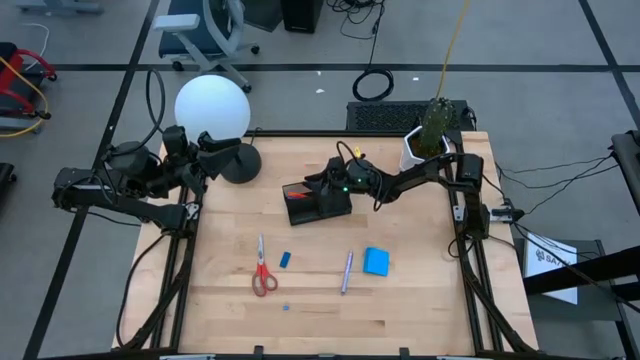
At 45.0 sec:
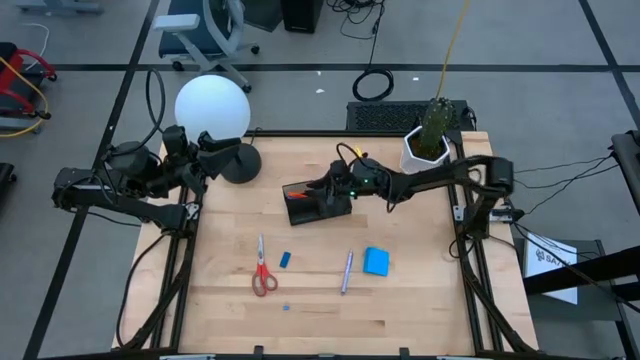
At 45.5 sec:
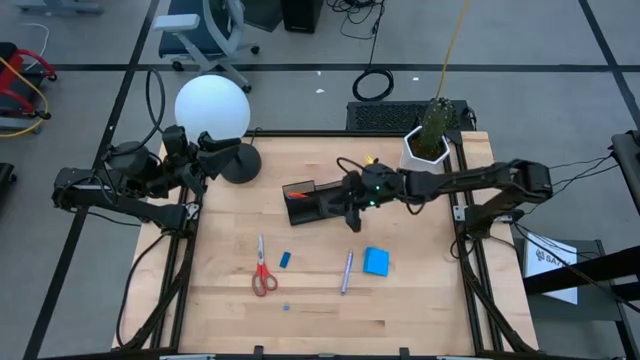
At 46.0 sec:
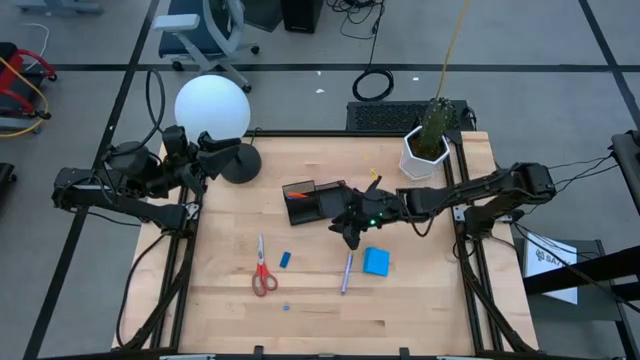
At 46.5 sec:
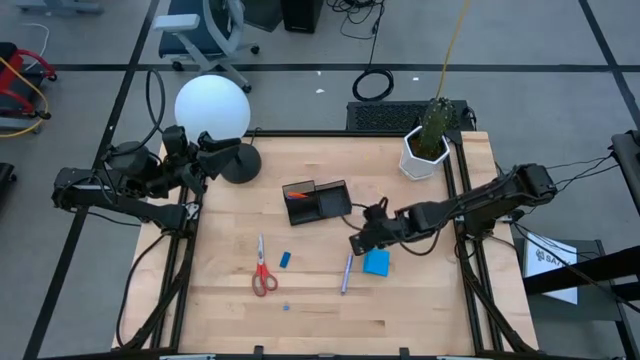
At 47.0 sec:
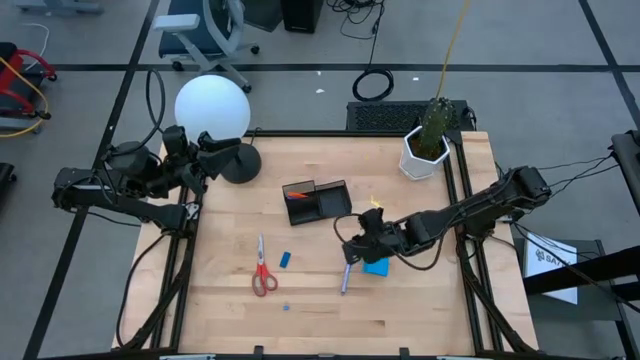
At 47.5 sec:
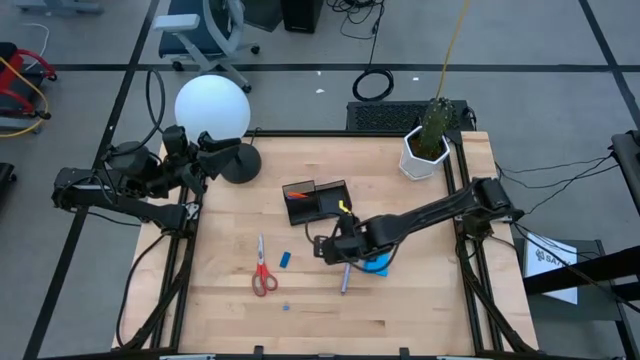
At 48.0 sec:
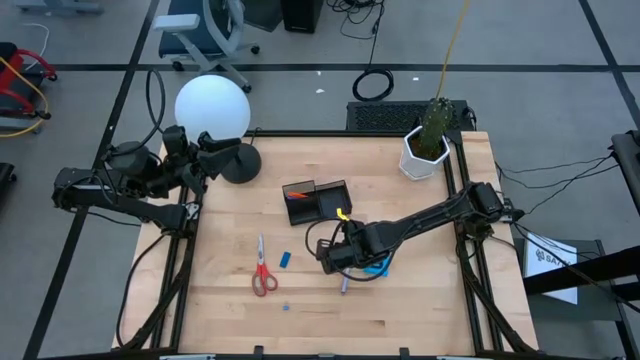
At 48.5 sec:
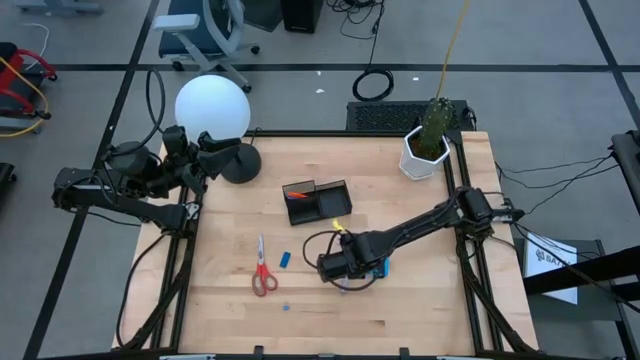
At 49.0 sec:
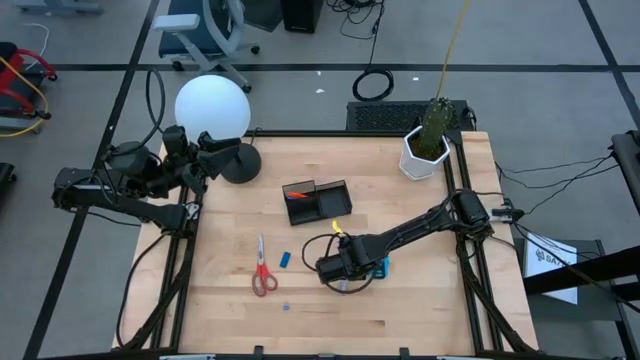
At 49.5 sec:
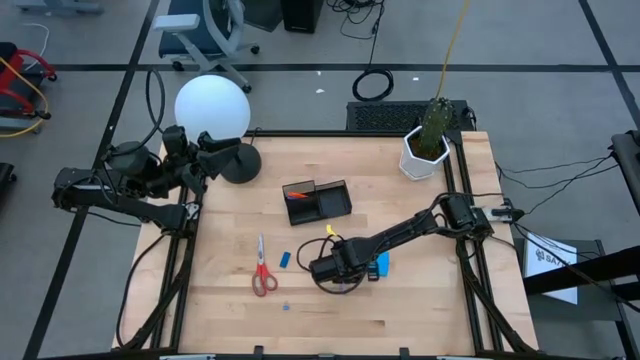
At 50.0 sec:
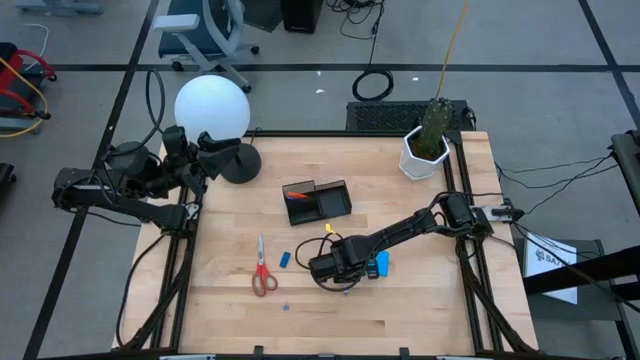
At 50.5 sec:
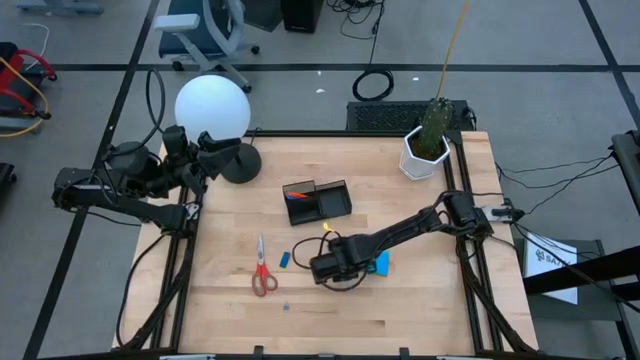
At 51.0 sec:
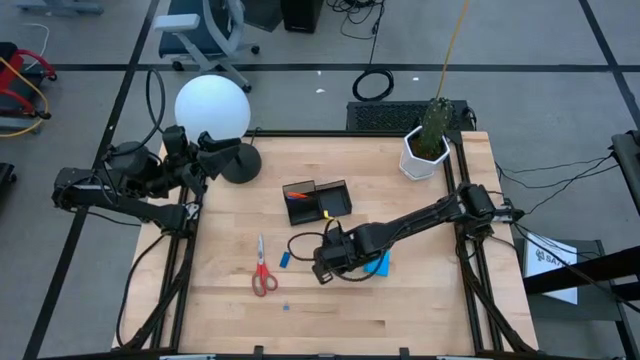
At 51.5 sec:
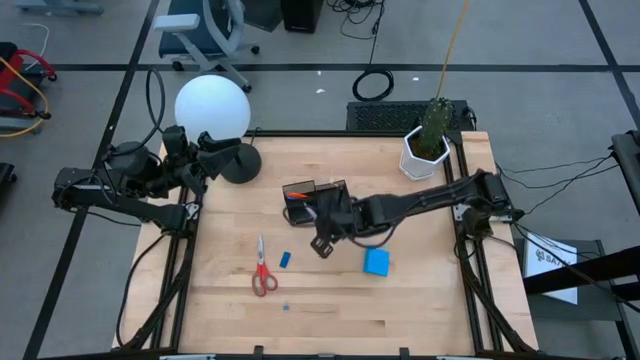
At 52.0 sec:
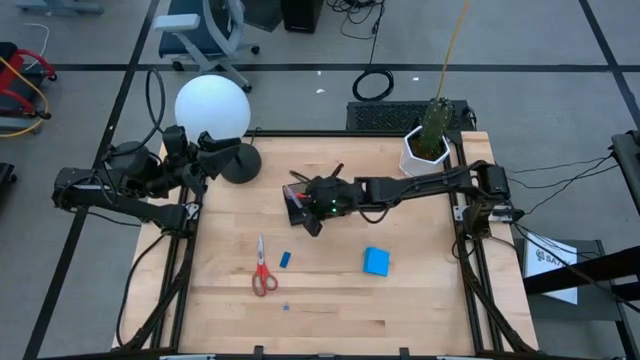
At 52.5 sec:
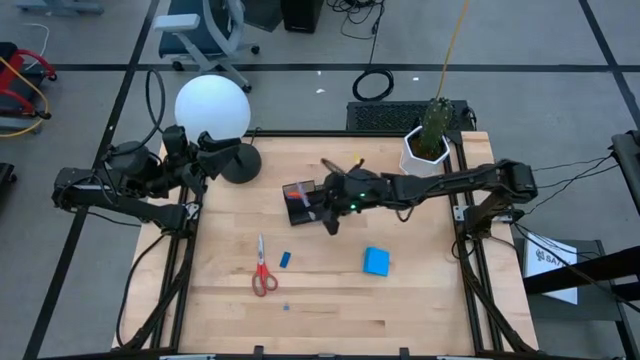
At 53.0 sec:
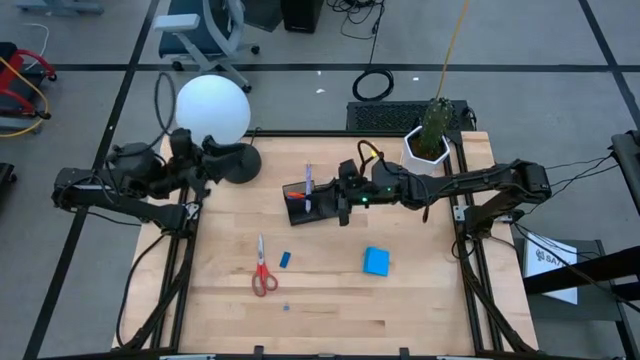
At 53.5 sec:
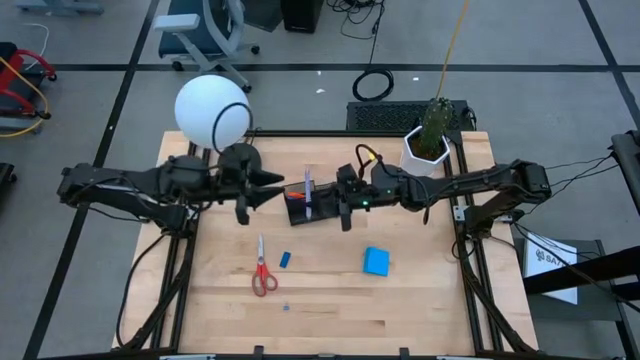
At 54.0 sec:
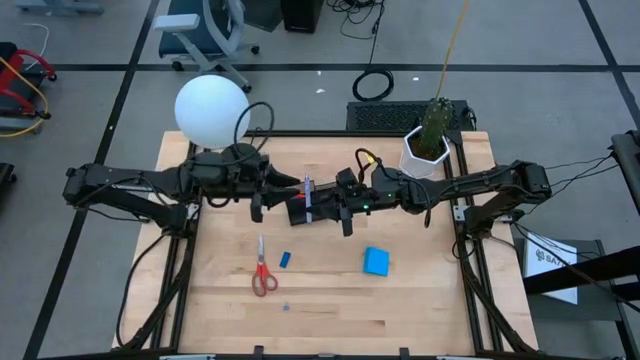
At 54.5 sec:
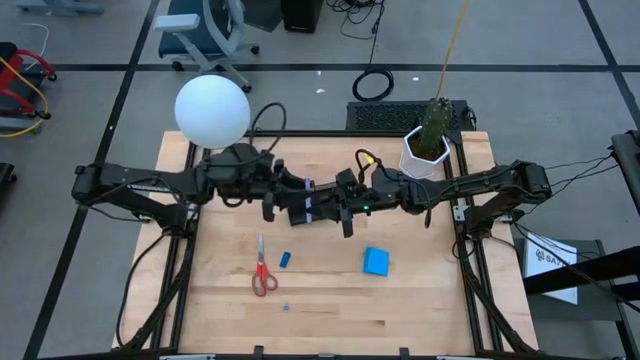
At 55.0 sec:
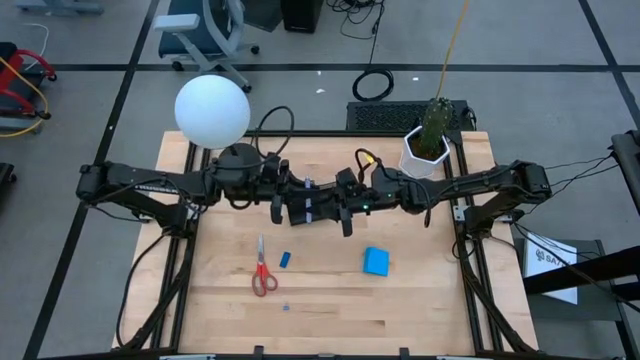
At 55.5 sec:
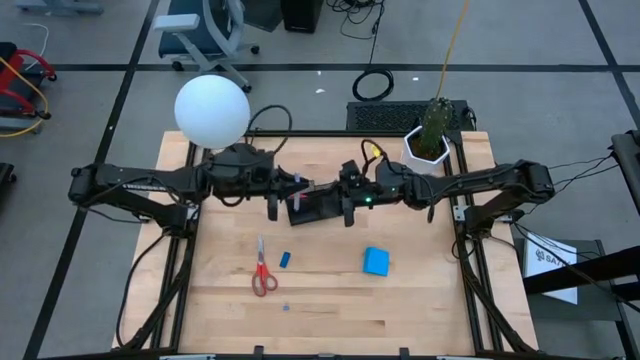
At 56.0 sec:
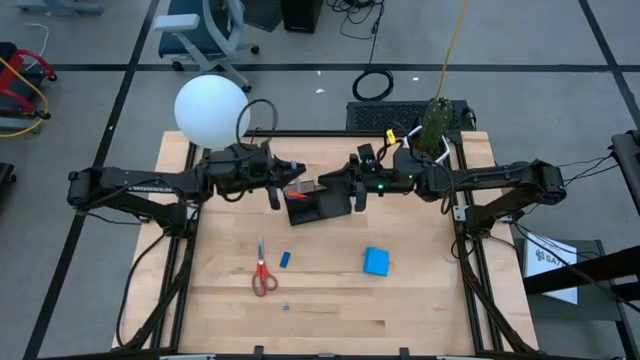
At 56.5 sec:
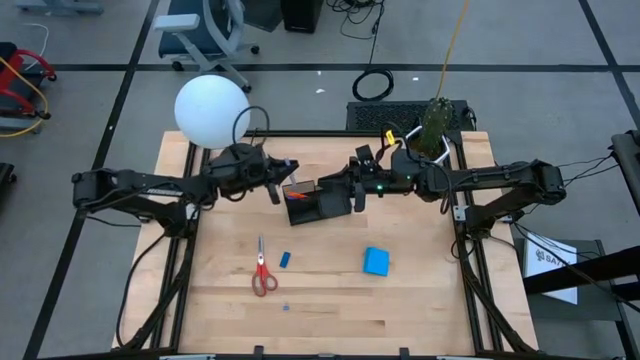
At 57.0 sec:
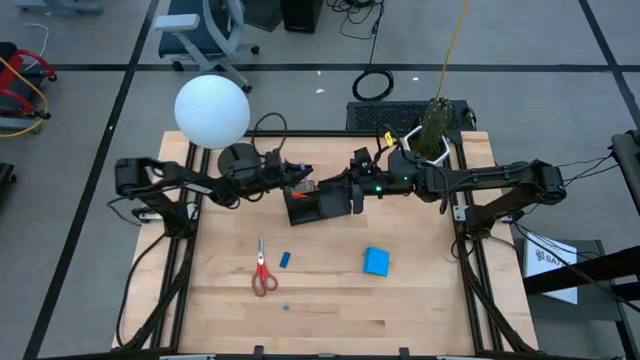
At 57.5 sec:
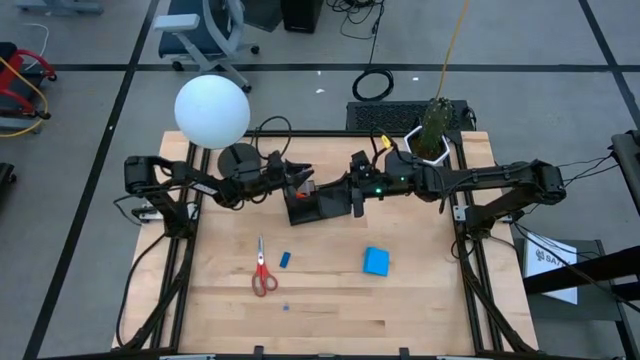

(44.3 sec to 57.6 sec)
Task: Pick and place office supplies into organizer
Put the purple pen into the black desk organizer

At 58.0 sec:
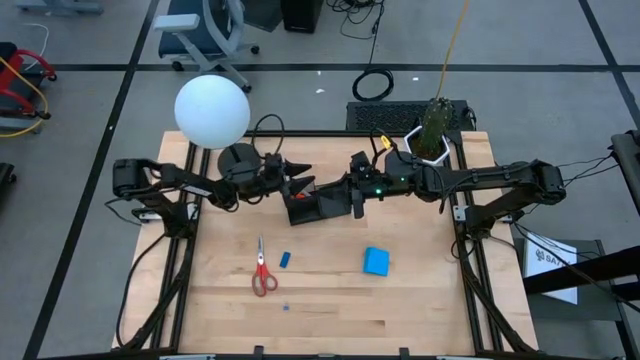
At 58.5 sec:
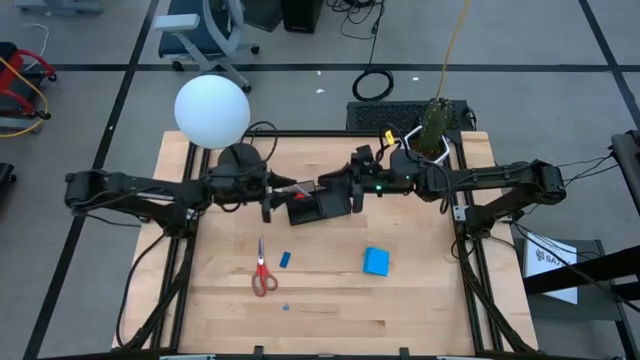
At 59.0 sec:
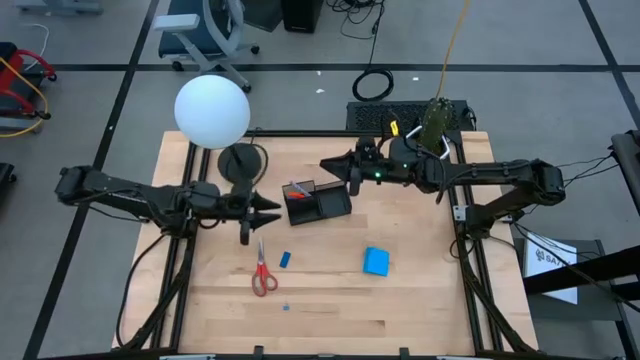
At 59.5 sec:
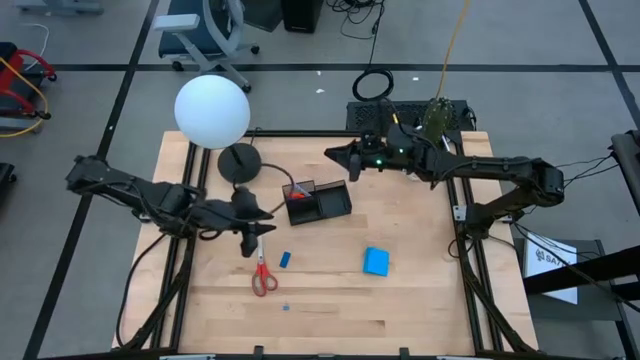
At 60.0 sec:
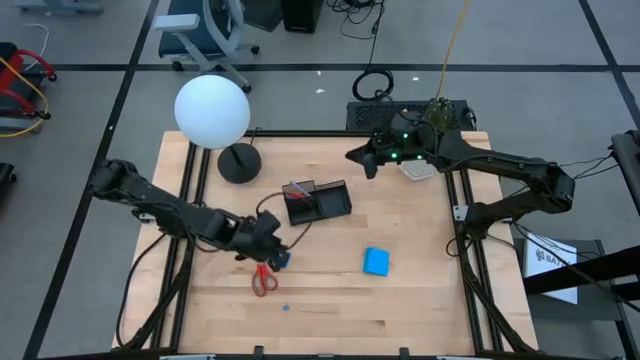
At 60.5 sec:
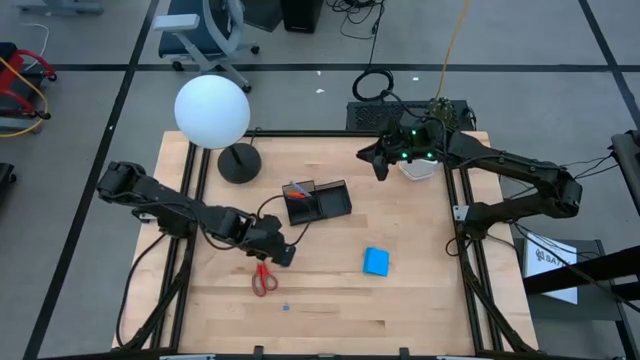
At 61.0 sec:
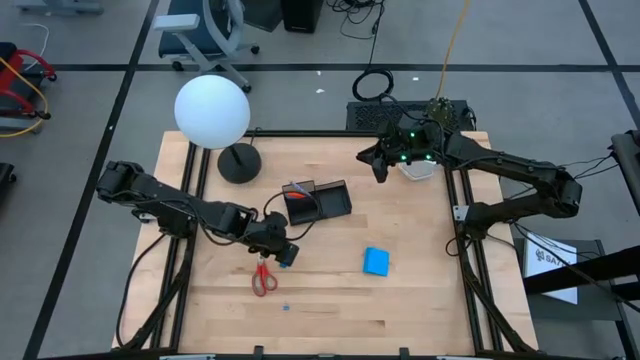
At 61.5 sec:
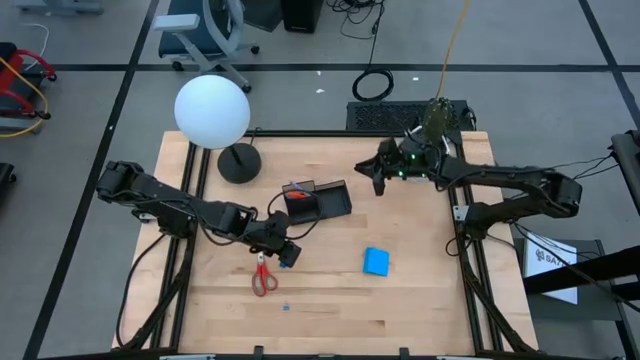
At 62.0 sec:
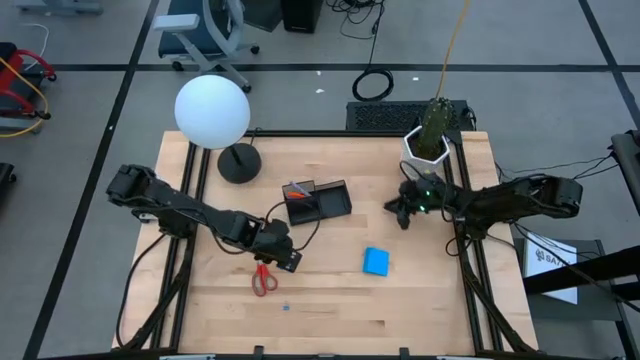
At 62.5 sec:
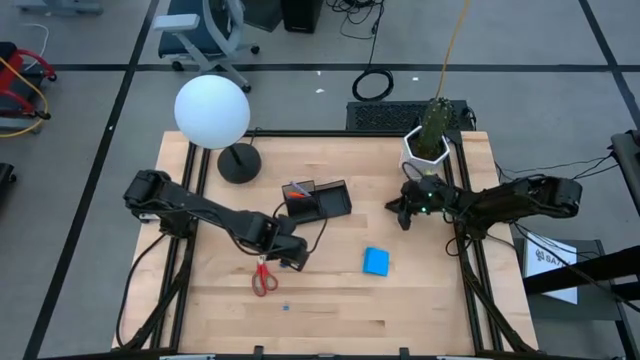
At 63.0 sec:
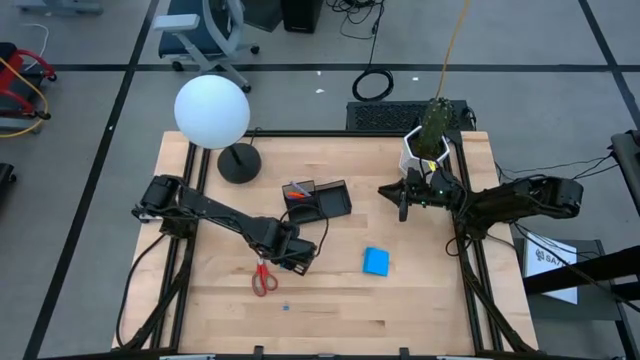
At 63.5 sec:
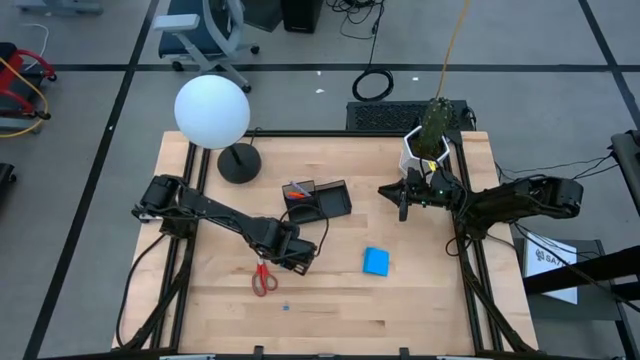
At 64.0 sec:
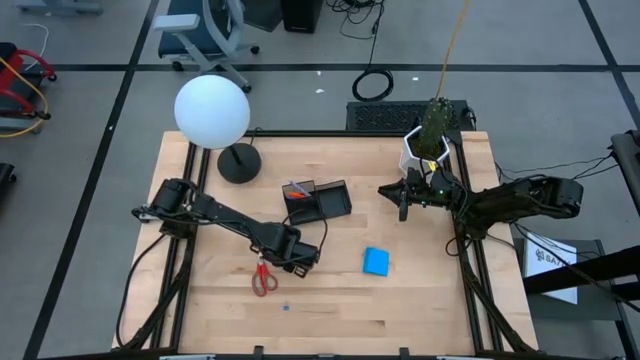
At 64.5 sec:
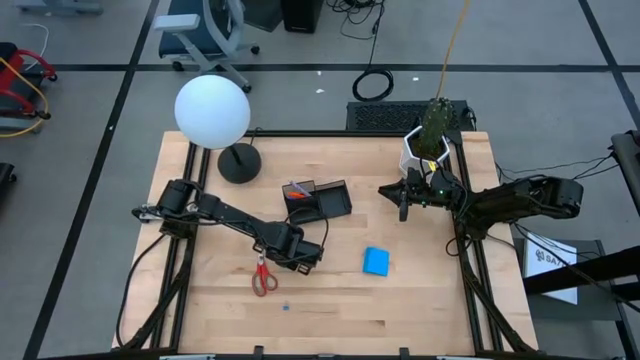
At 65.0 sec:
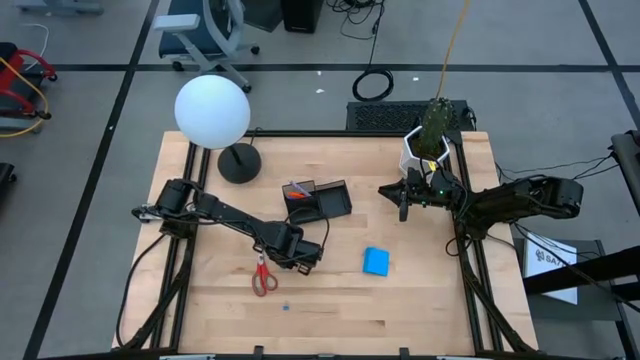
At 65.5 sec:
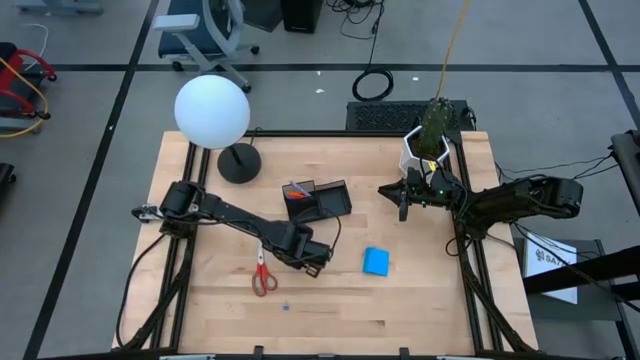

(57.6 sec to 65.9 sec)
Put the blue eraser into the black desk organizer
